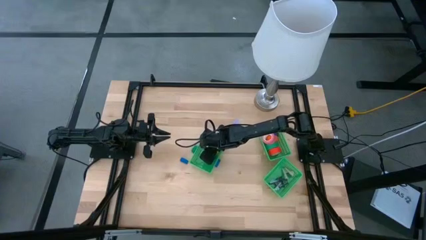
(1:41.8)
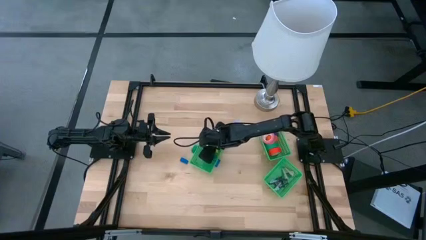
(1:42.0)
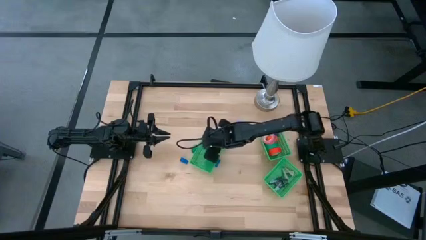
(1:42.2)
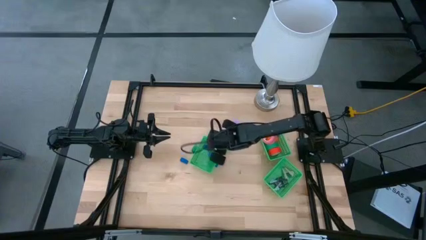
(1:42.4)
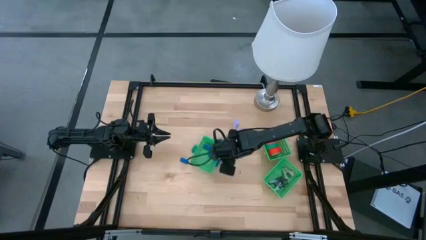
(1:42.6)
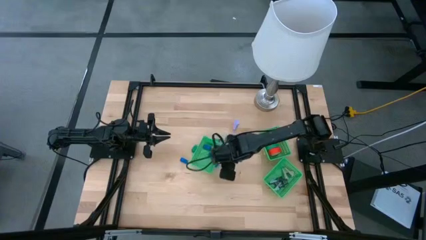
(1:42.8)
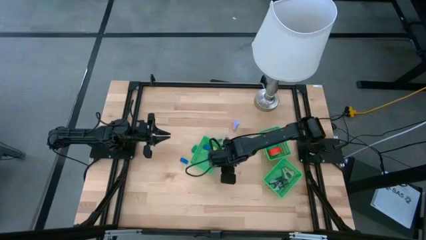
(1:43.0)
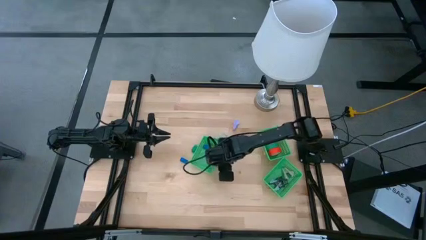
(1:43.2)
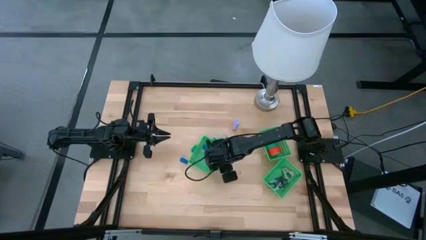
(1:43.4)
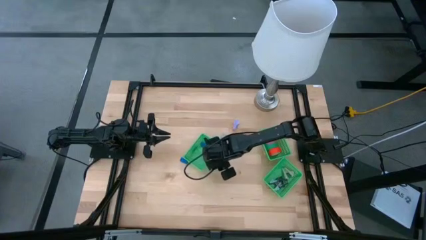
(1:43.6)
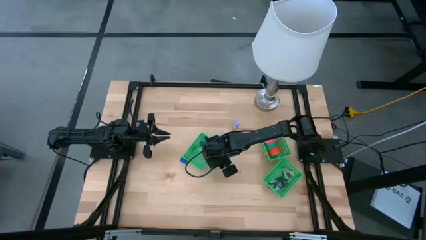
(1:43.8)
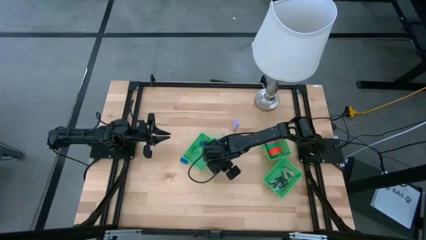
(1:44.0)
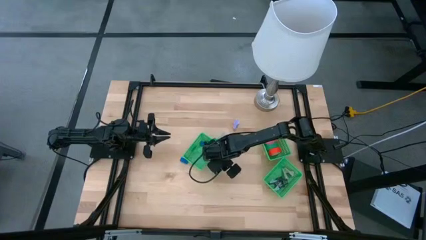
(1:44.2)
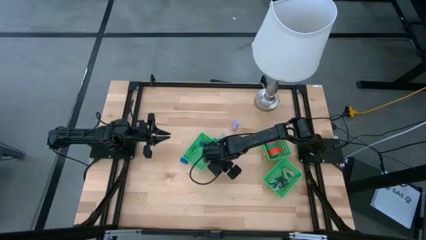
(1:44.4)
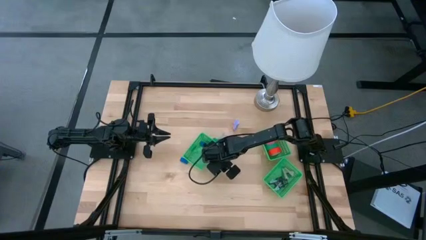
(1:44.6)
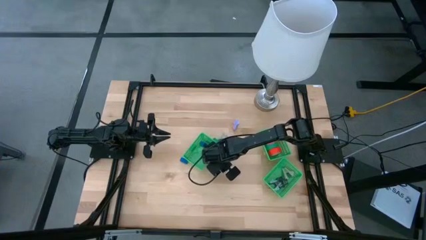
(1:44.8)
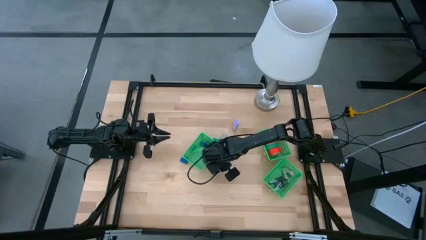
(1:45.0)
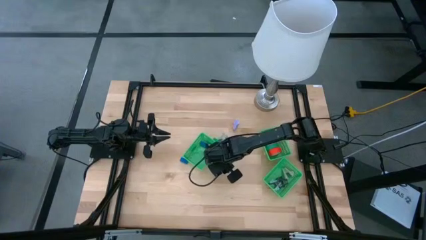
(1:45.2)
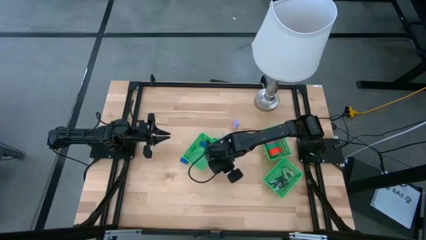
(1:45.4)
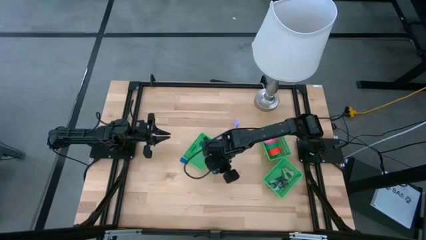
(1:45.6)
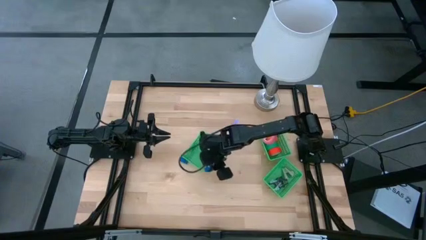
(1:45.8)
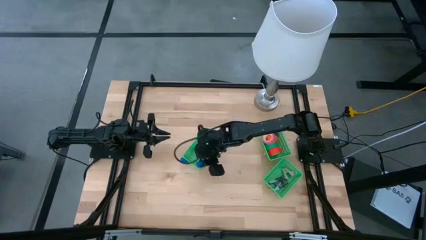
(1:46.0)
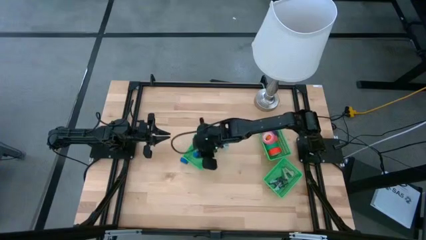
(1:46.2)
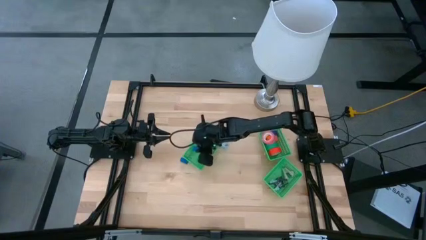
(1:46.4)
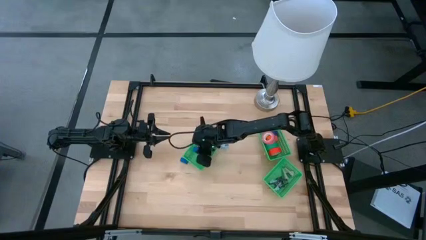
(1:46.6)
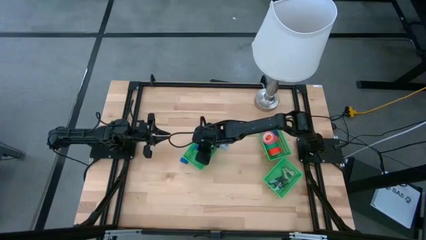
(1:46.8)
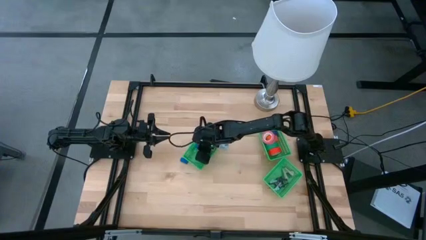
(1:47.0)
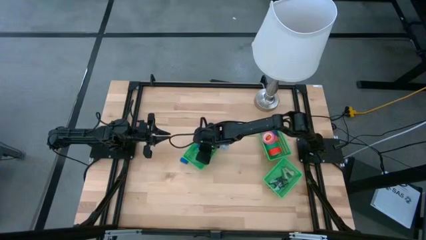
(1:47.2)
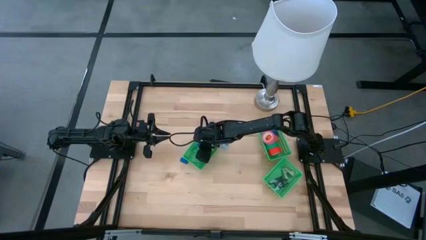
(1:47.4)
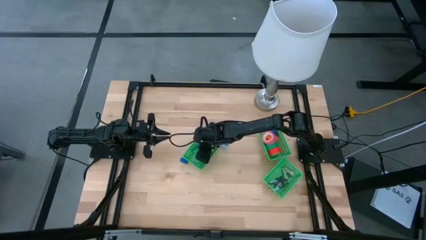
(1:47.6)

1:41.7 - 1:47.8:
Task: Pick and place Stapler, Stapler remover, tape
Put the blue stapler into the center green bin

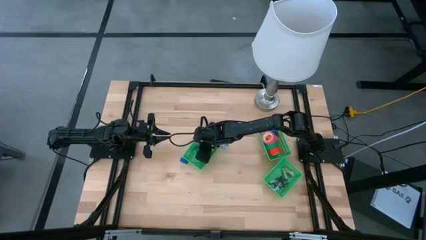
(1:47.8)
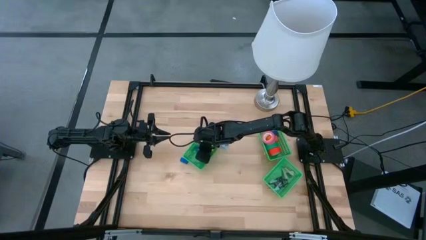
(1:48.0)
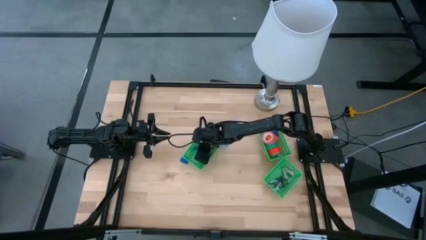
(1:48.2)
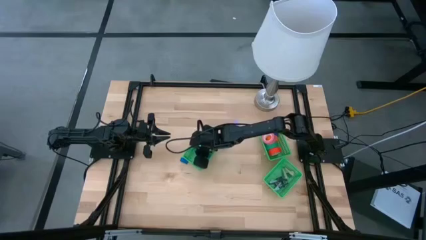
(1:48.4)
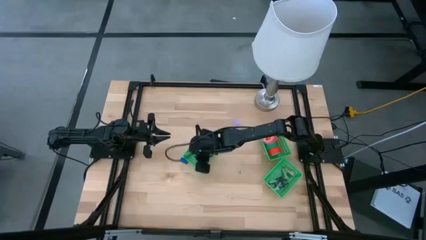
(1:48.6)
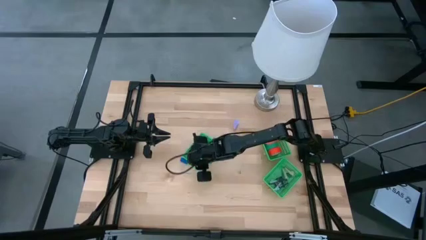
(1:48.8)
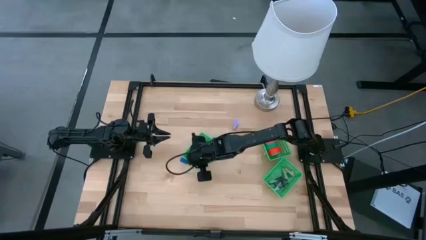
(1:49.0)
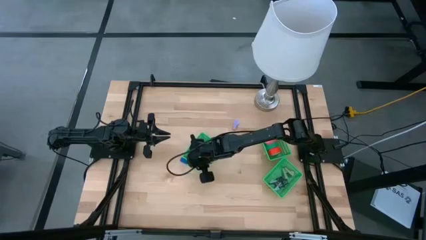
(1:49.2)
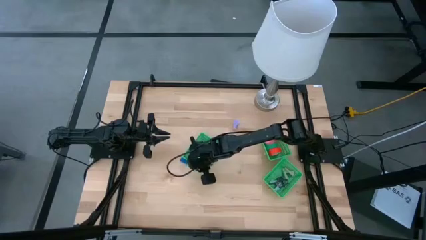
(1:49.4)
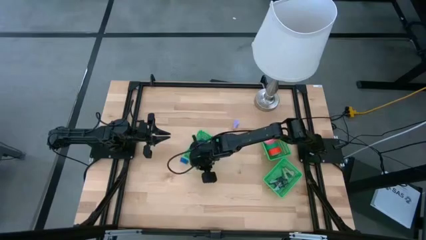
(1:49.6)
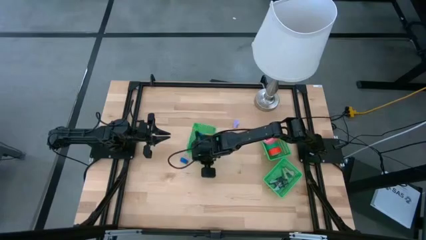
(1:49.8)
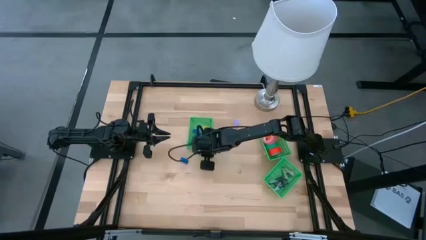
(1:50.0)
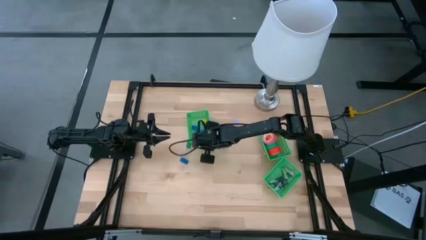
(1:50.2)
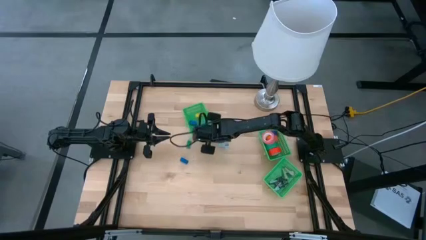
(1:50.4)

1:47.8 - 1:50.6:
Move the center green bin to the top left of the table

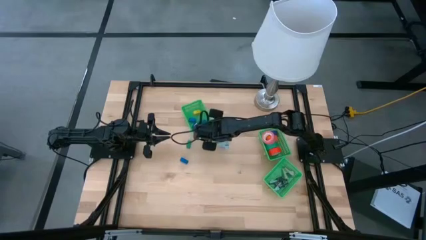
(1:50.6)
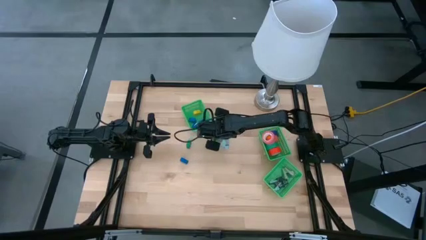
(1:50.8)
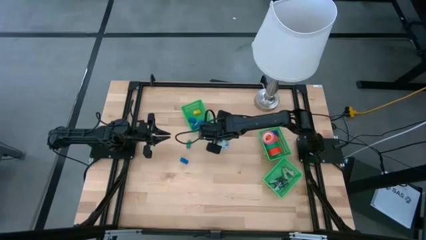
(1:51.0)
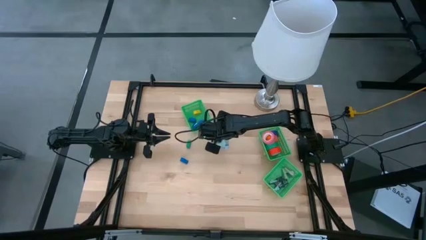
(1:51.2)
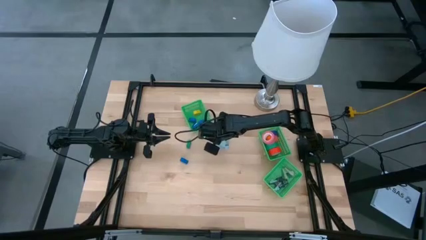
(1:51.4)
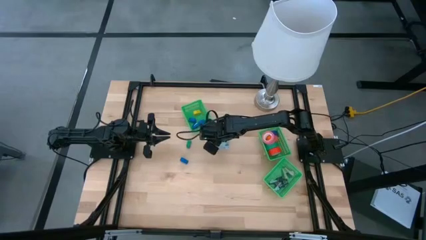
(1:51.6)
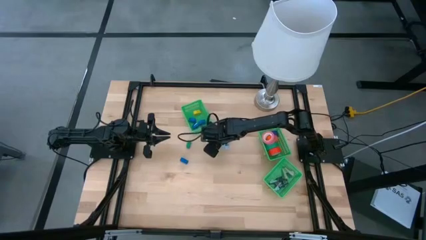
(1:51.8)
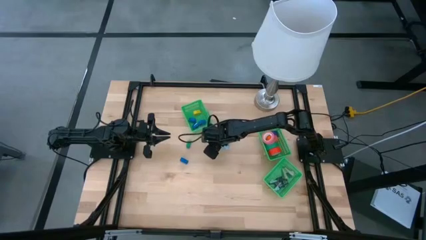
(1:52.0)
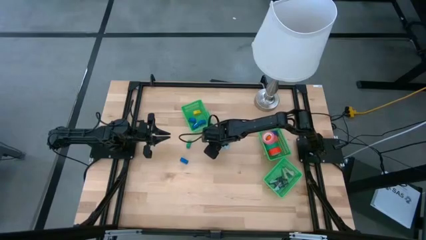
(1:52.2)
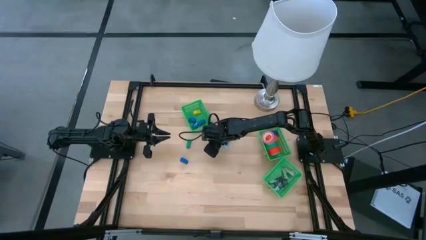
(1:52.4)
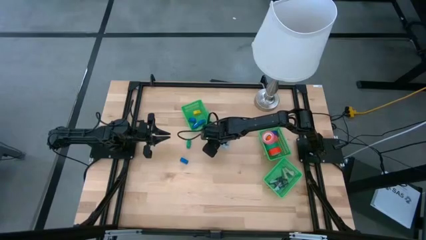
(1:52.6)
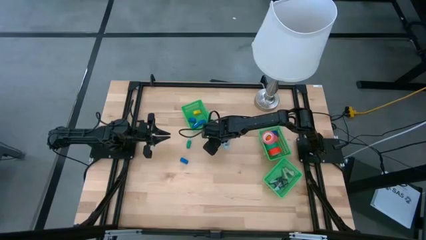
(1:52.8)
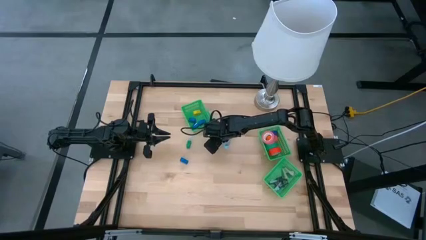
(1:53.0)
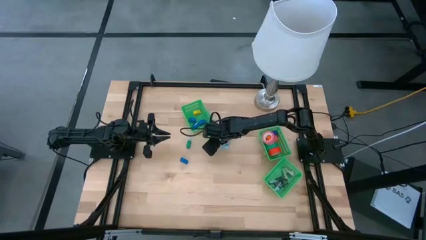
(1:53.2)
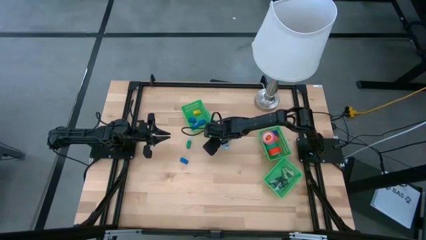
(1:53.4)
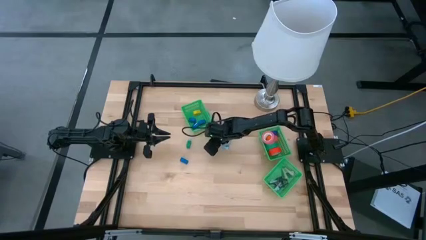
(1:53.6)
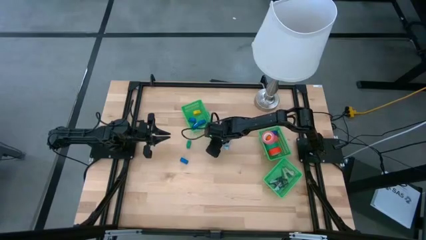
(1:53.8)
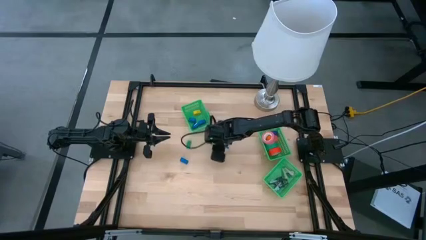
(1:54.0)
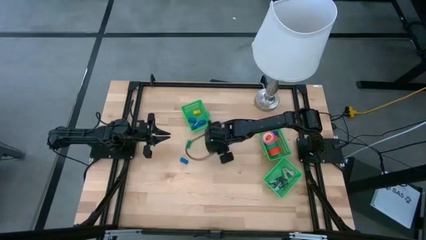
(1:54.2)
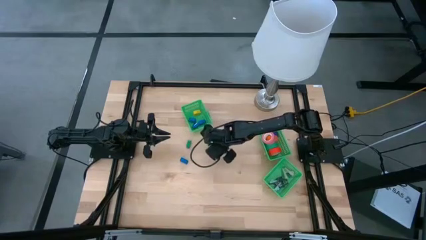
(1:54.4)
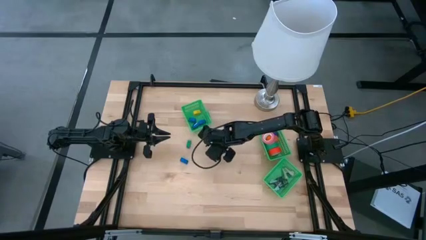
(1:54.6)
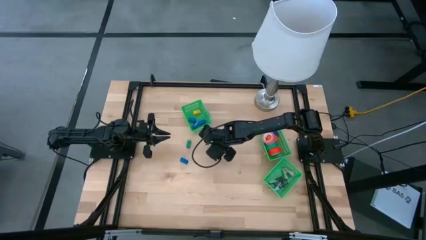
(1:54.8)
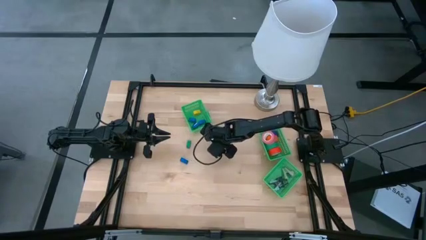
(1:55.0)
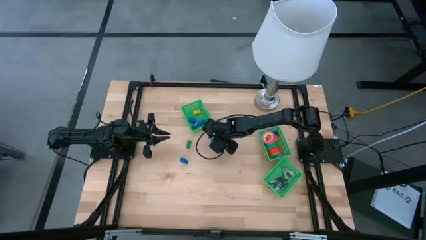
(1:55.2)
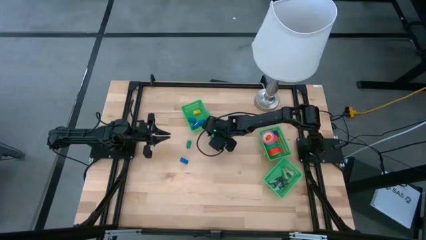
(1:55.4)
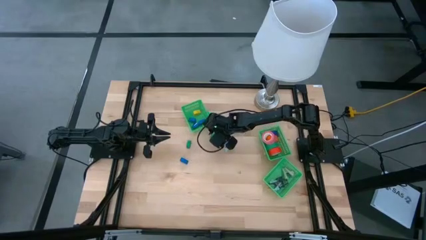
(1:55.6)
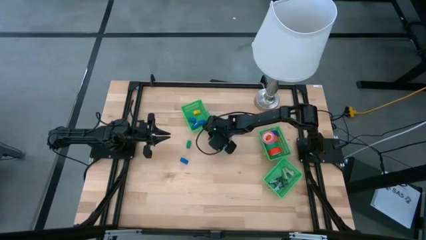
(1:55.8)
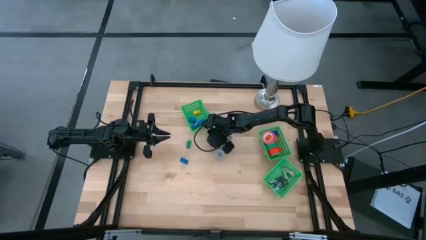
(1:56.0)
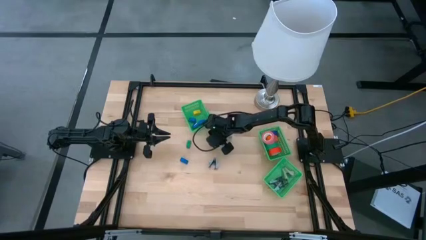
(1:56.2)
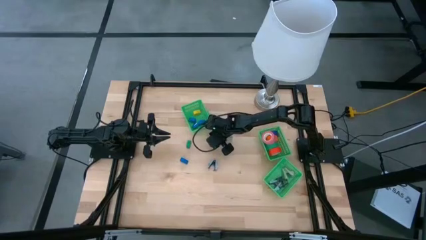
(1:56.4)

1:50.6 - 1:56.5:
Put the green stapler into the top left green bin

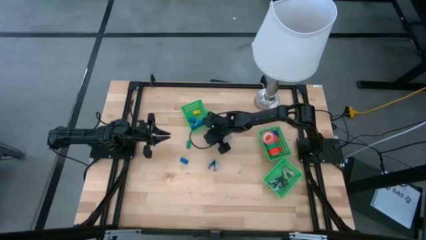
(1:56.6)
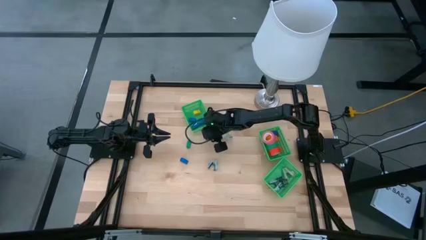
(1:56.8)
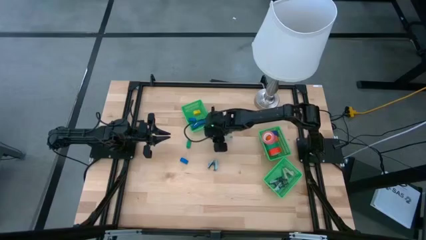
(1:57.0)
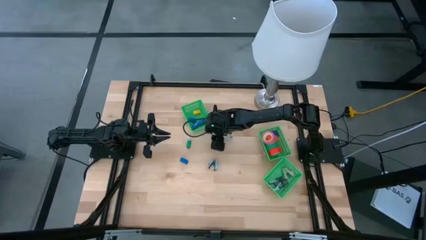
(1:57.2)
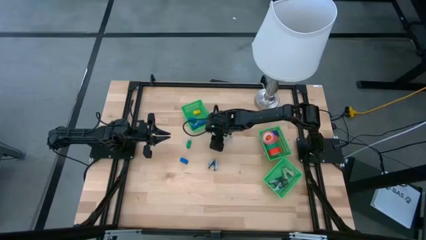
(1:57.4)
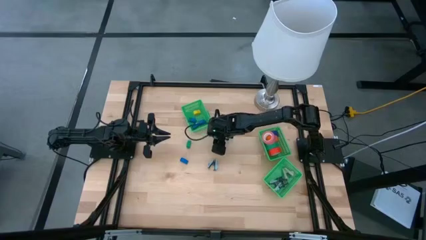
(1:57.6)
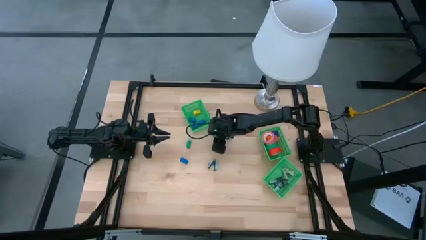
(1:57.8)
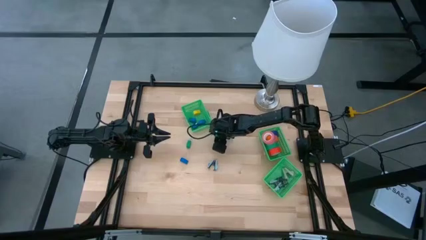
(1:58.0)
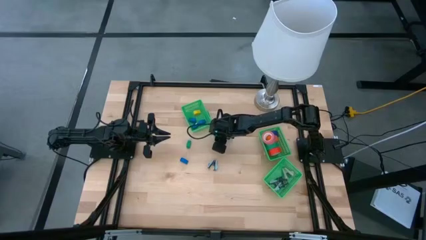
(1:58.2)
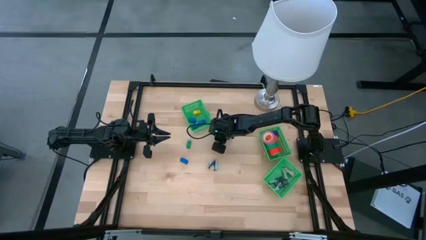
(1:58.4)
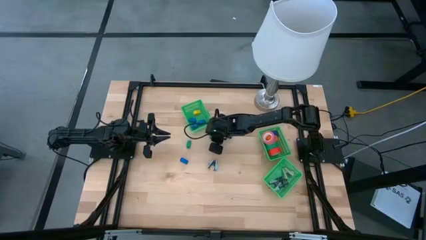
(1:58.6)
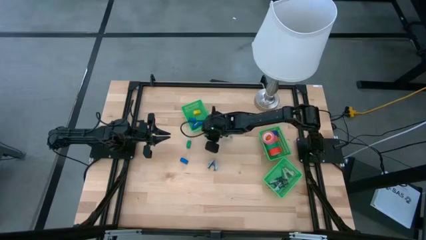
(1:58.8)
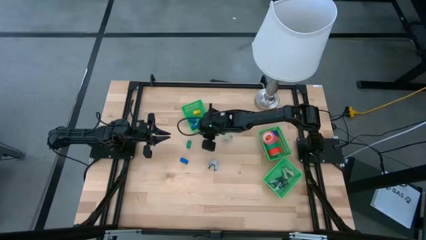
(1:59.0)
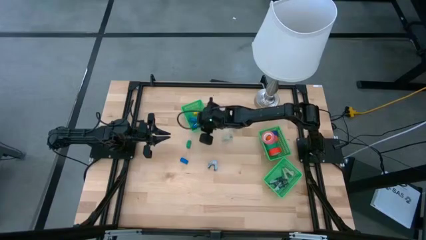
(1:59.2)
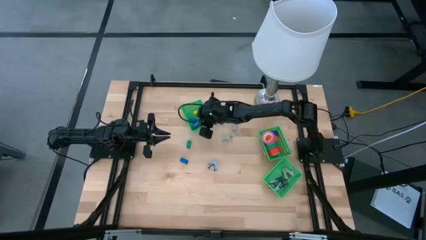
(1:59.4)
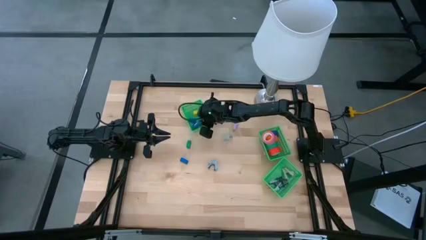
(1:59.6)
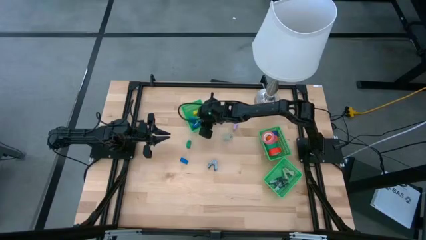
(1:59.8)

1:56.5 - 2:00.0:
Put the green stapler into the top left green bin
